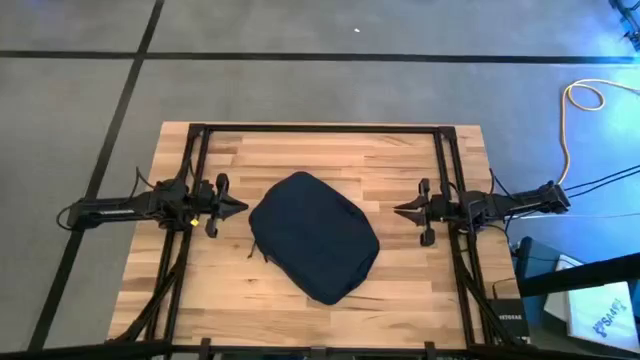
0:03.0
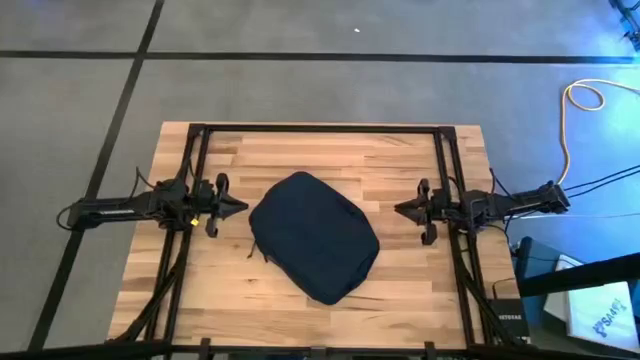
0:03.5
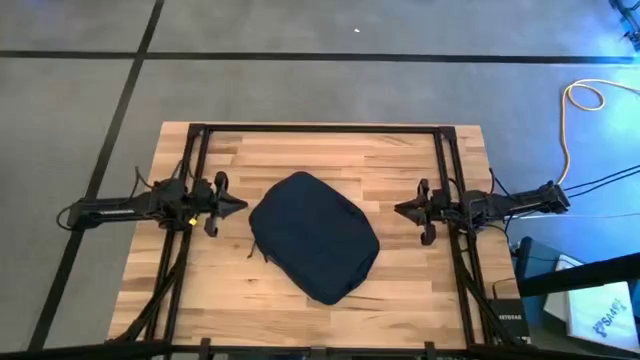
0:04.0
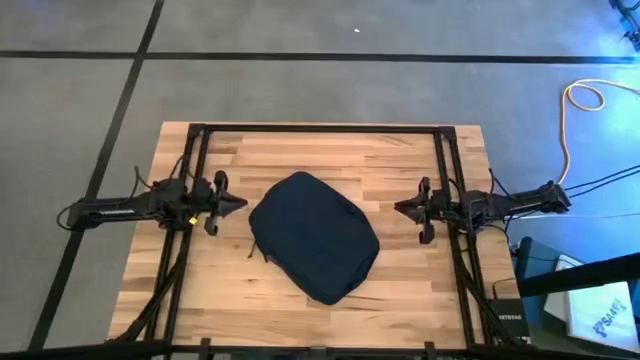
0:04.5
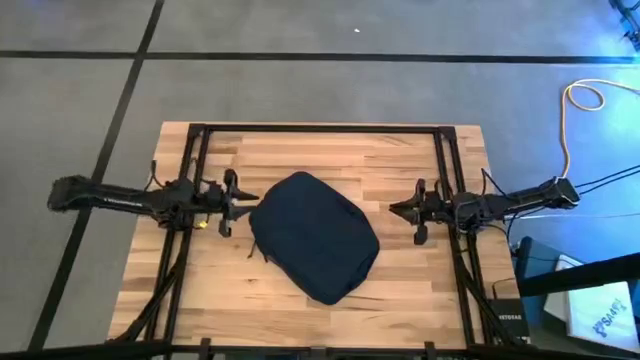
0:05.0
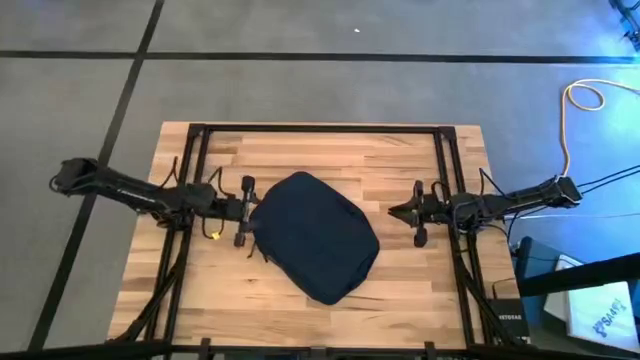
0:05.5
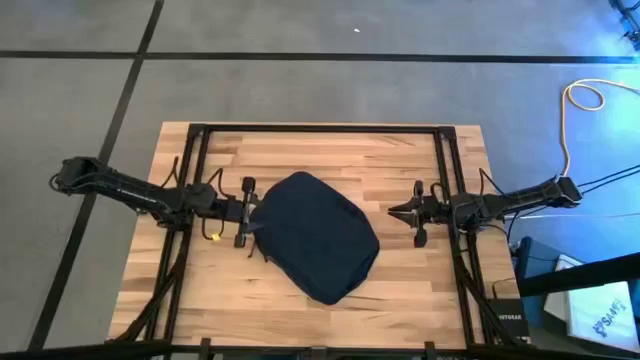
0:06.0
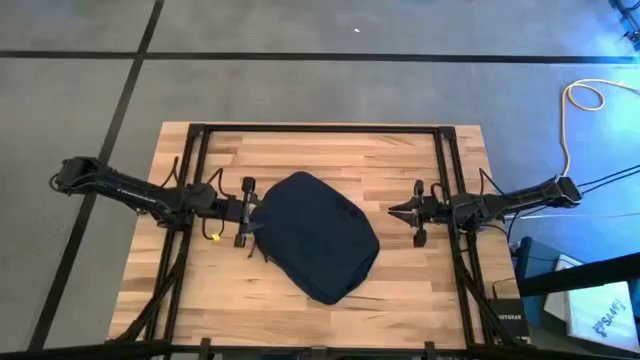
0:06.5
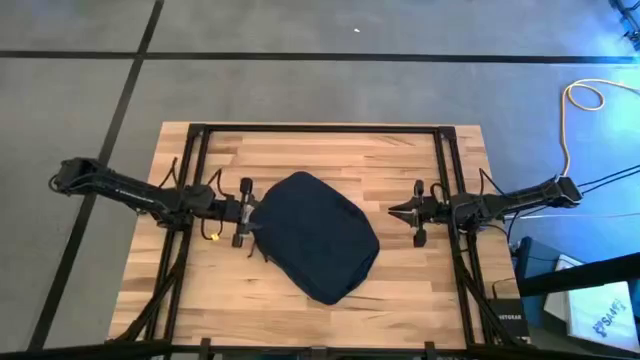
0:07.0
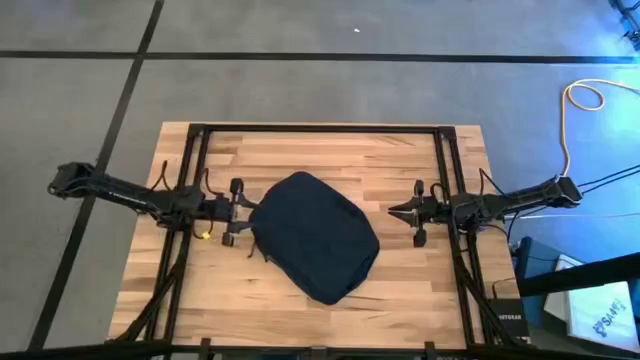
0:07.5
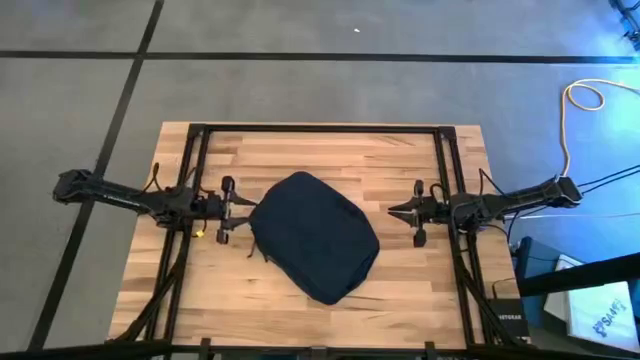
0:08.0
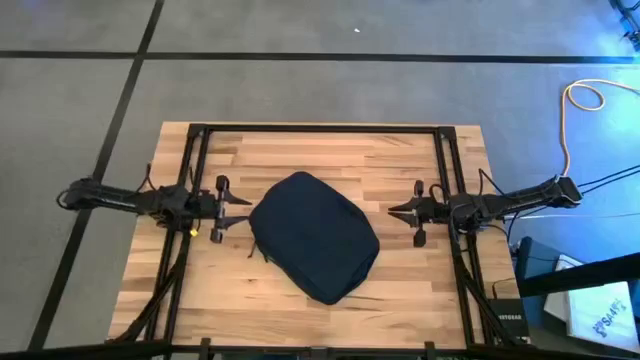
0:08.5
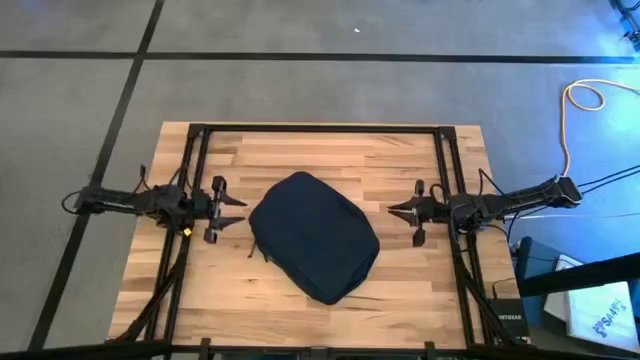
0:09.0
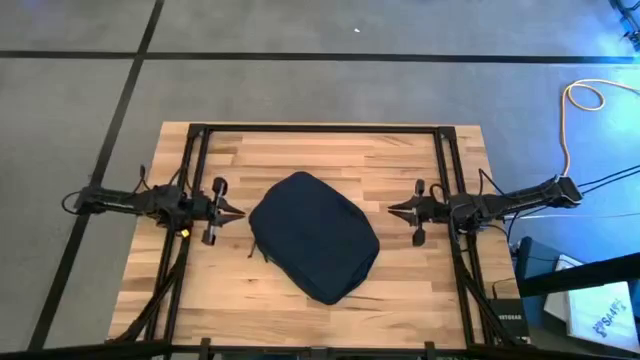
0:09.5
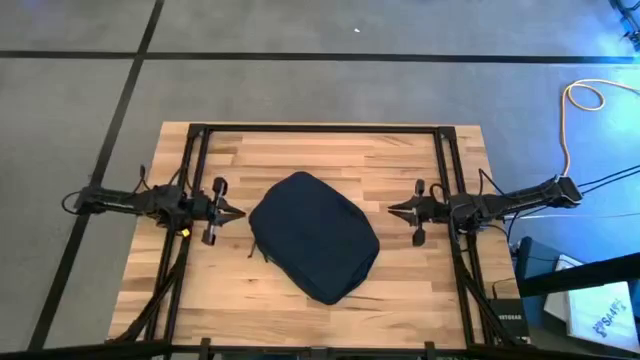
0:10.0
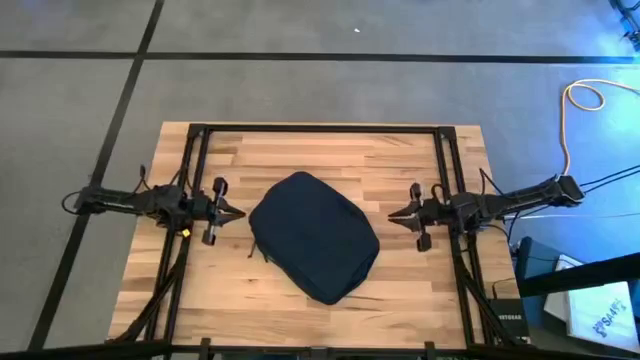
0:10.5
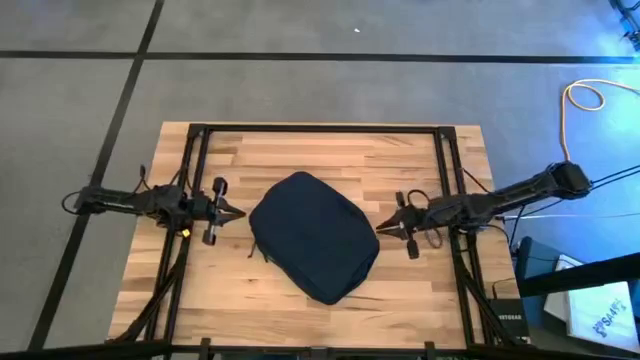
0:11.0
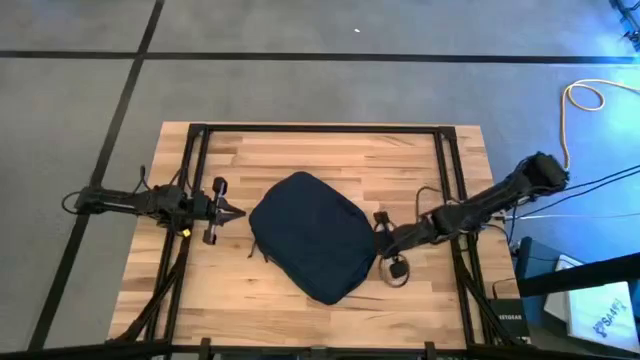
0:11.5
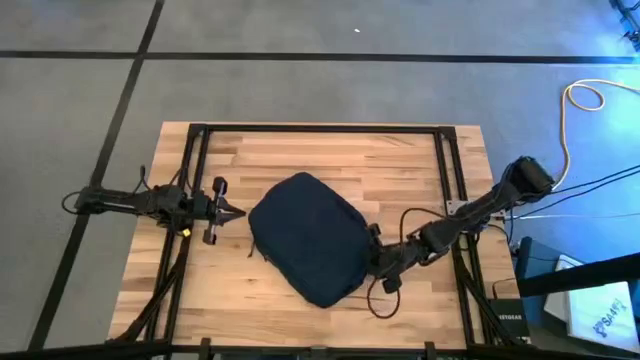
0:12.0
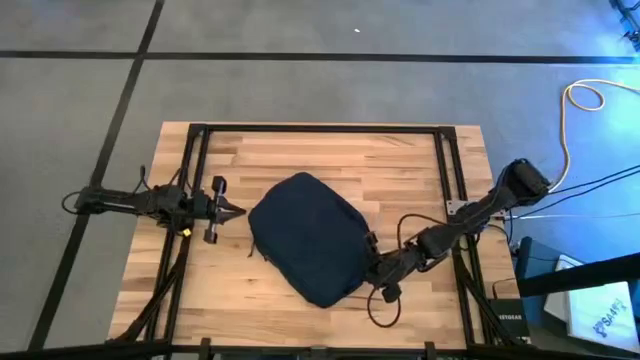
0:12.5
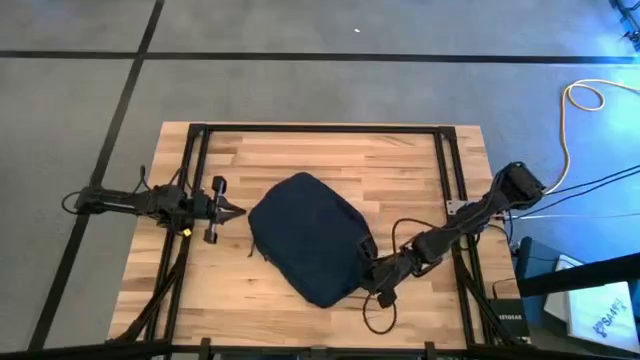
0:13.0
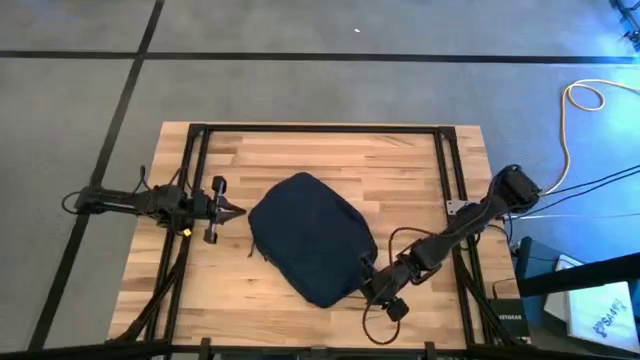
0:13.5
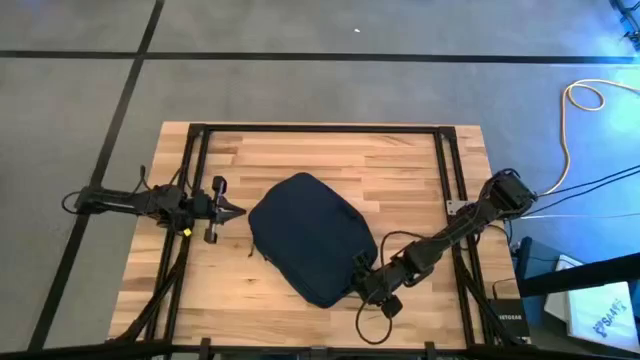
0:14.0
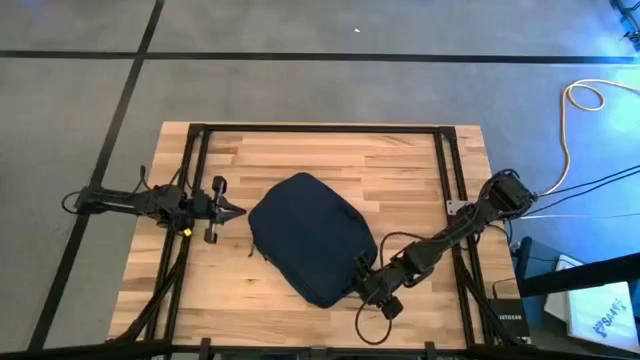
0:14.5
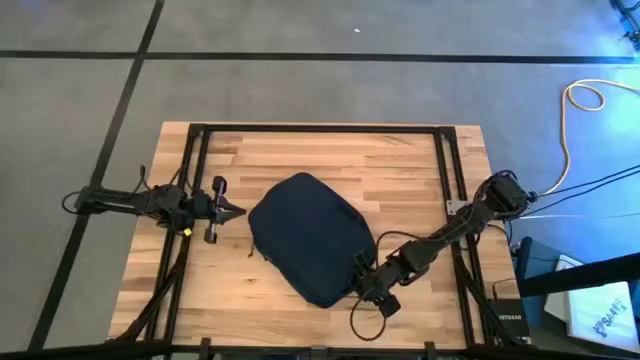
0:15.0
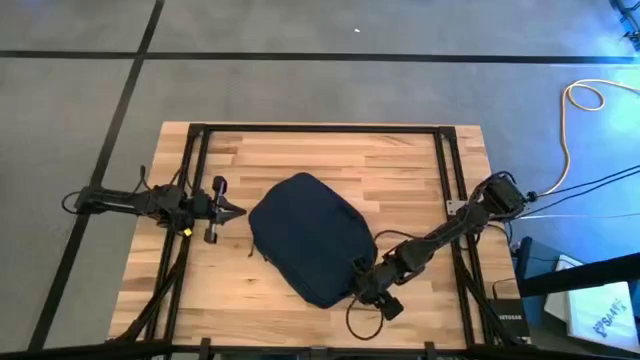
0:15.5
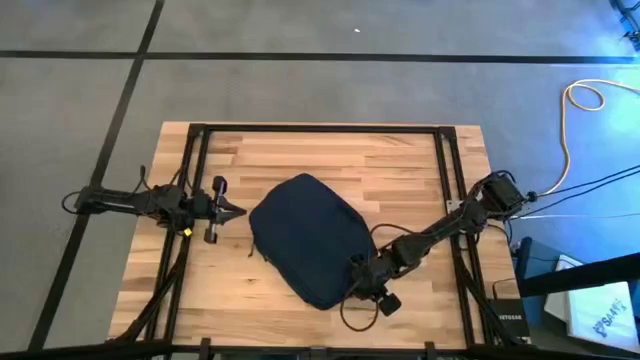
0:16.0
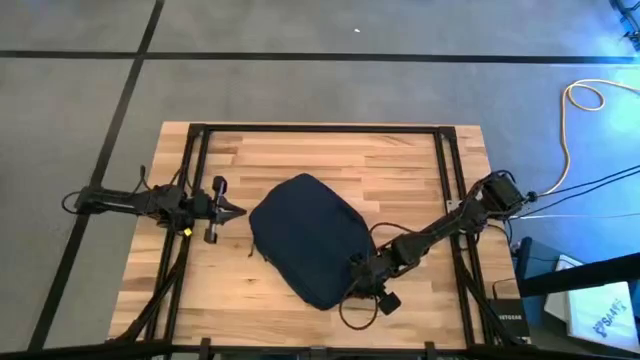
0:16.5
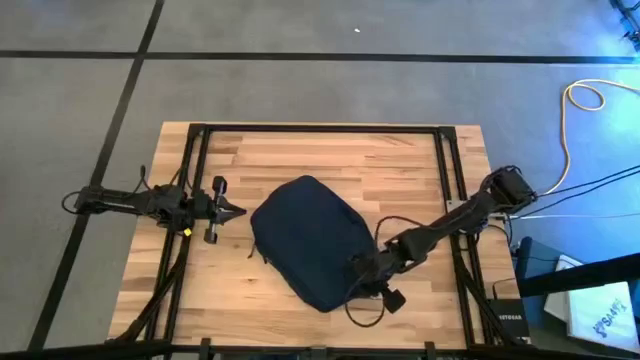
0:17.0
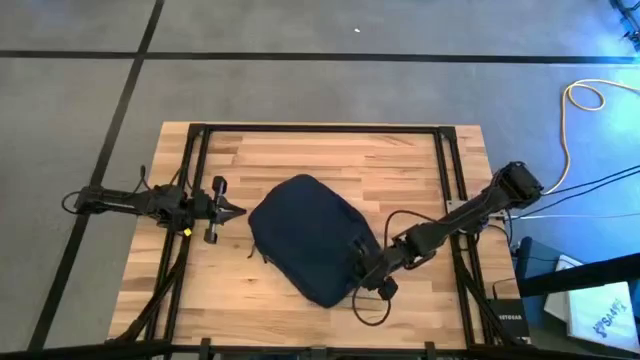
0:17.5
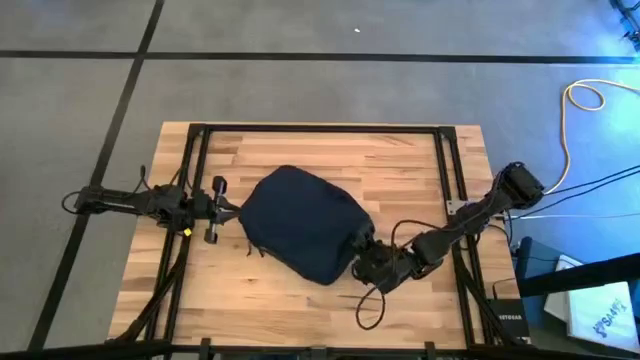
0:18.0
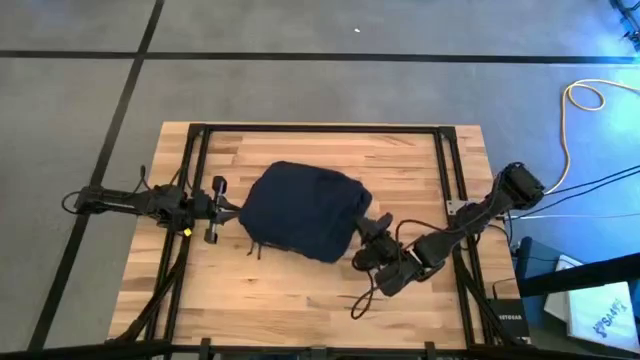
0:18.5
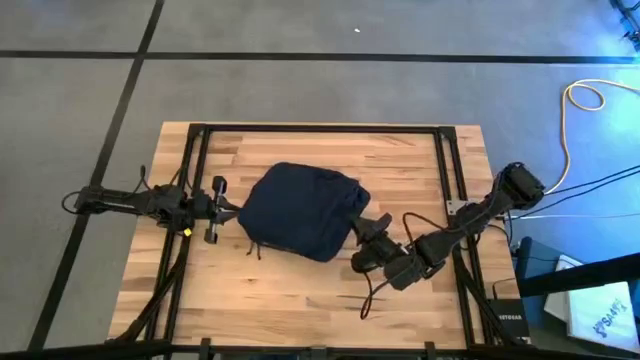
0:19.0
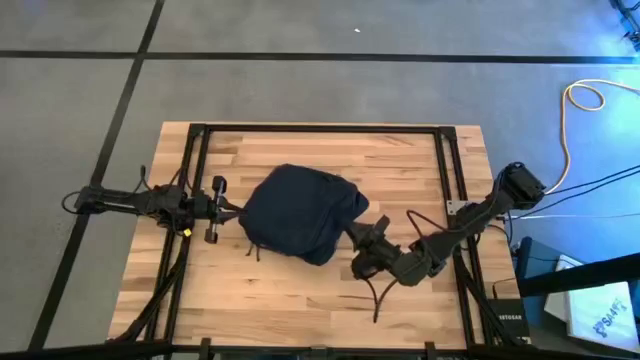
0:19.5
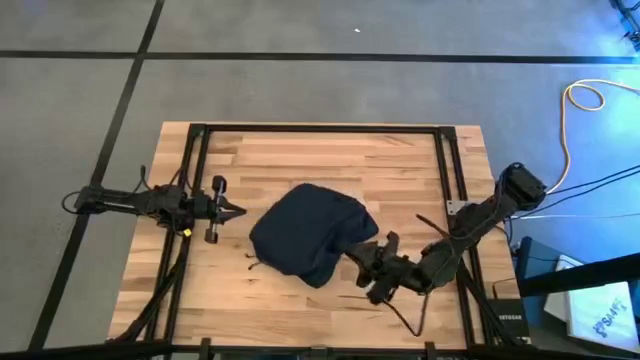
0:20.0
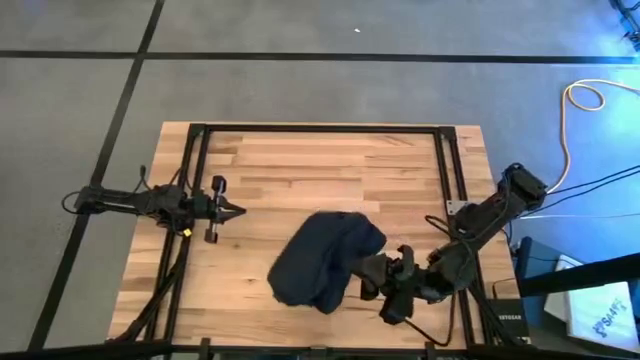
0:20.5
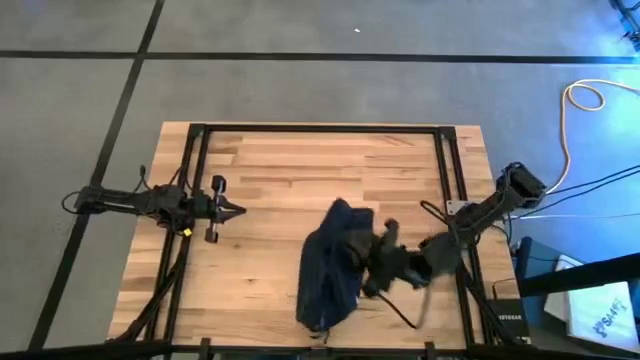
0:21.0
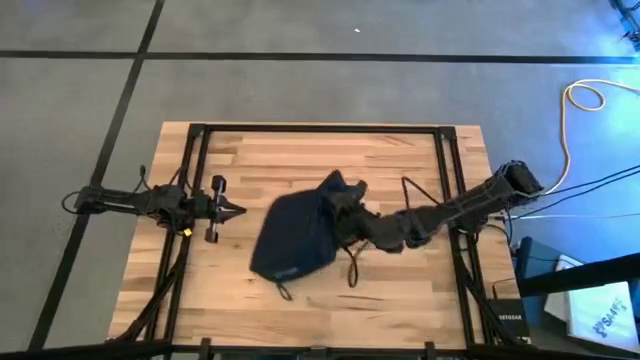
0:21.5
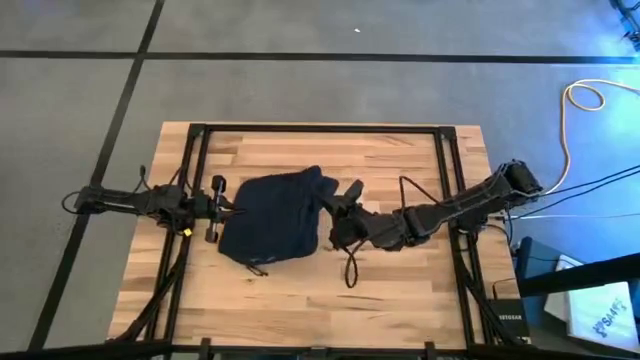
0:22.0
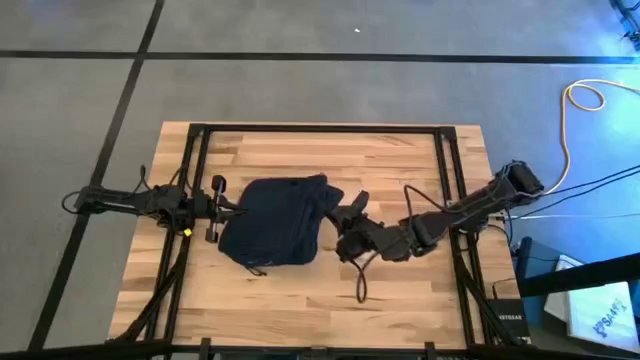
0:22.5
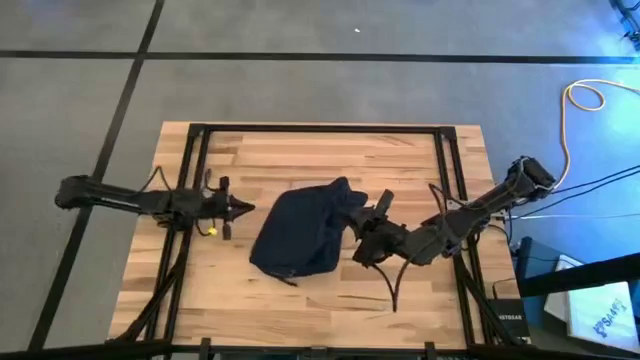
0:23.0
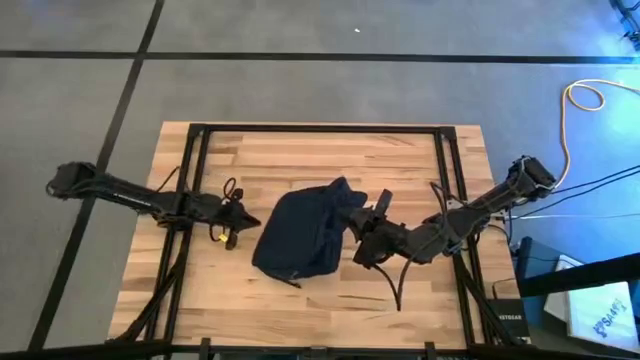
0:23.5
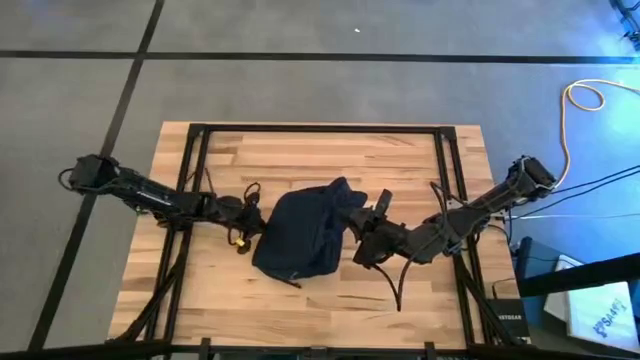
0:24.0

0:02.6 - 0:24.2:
Task: Unpack backpack
Open the blue backpack
